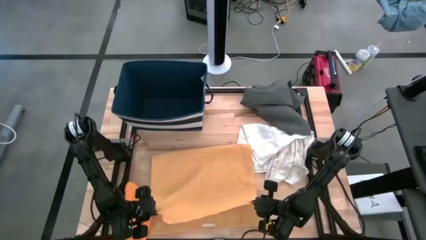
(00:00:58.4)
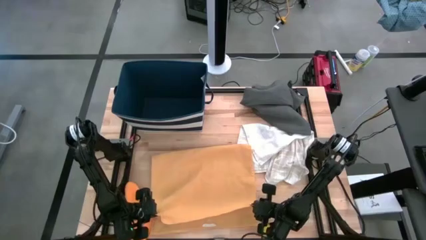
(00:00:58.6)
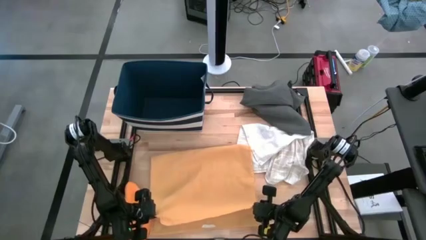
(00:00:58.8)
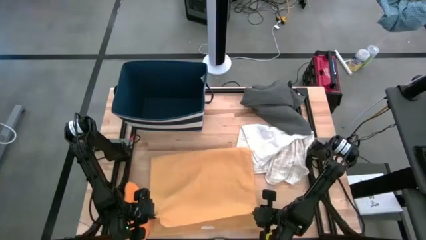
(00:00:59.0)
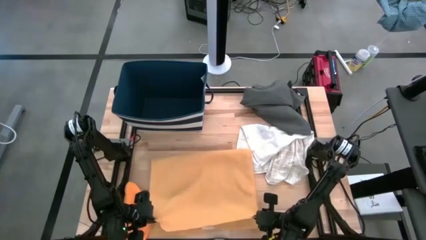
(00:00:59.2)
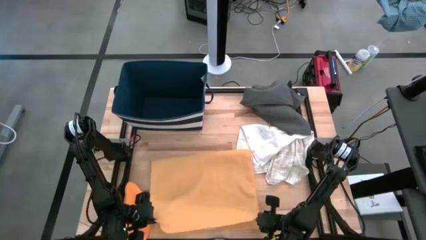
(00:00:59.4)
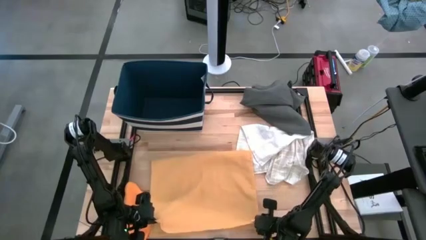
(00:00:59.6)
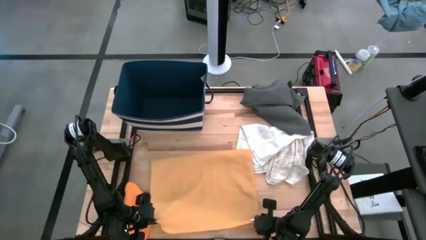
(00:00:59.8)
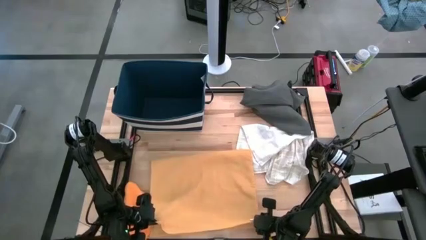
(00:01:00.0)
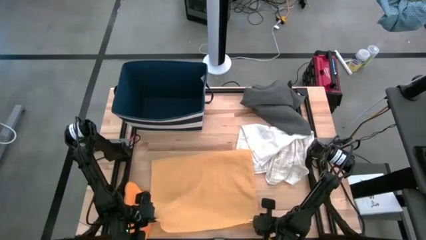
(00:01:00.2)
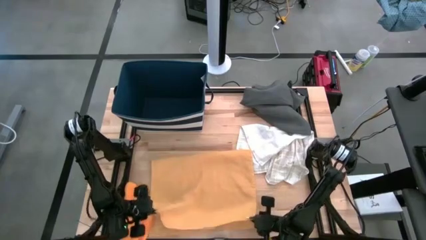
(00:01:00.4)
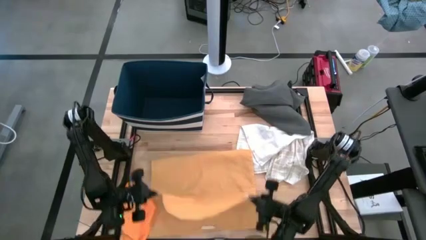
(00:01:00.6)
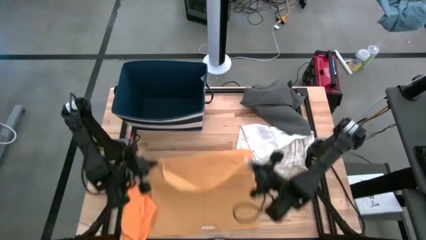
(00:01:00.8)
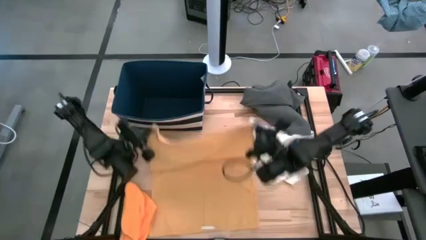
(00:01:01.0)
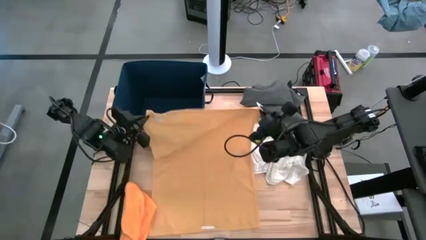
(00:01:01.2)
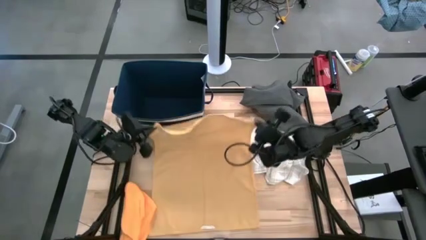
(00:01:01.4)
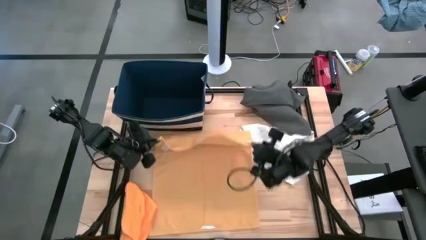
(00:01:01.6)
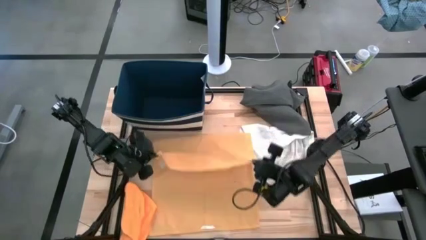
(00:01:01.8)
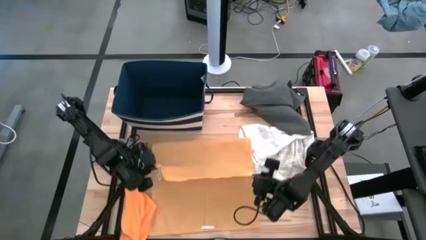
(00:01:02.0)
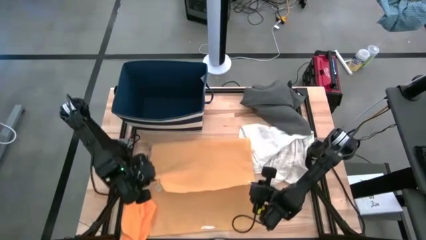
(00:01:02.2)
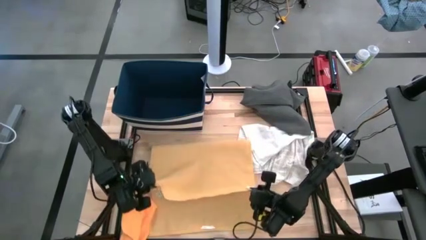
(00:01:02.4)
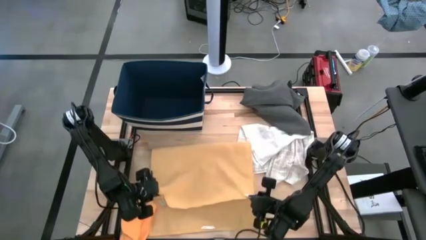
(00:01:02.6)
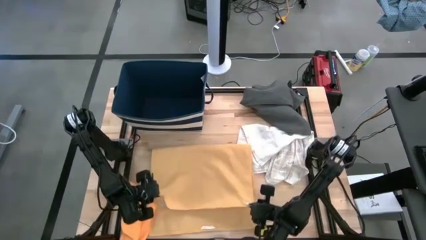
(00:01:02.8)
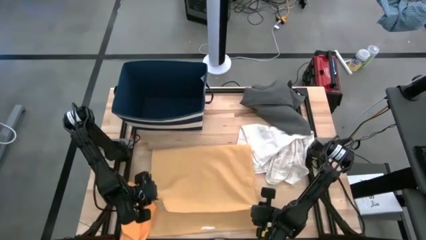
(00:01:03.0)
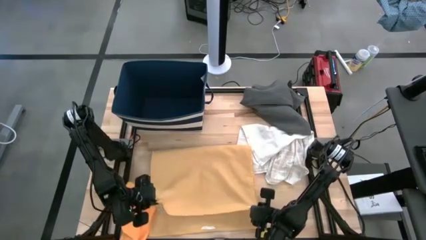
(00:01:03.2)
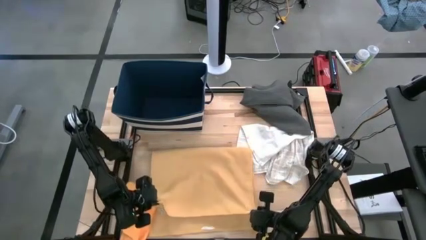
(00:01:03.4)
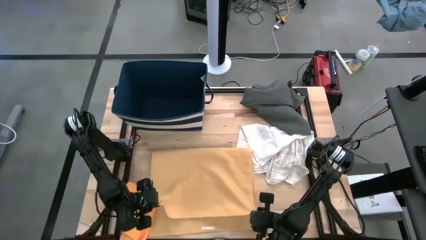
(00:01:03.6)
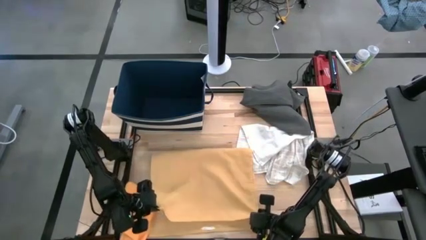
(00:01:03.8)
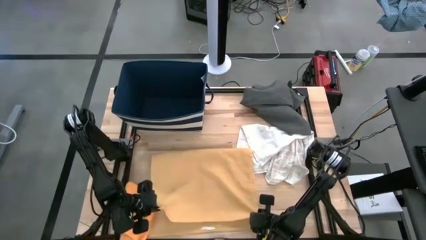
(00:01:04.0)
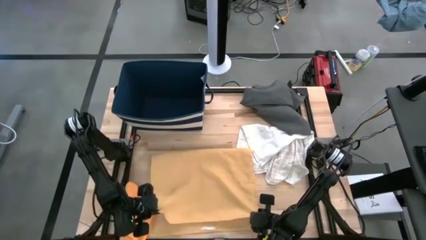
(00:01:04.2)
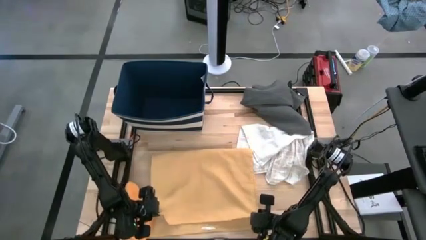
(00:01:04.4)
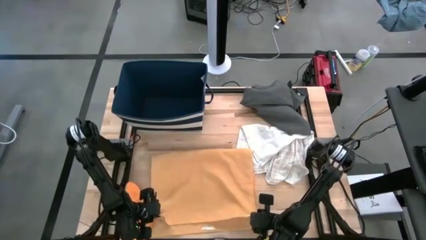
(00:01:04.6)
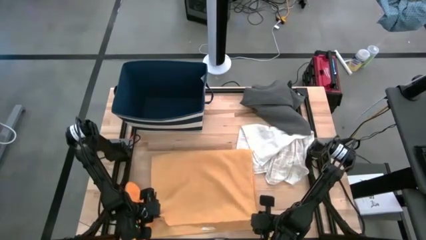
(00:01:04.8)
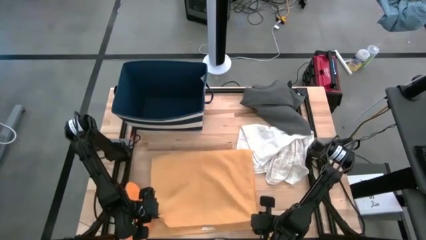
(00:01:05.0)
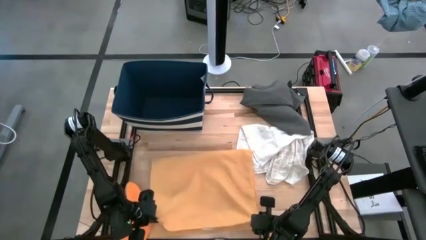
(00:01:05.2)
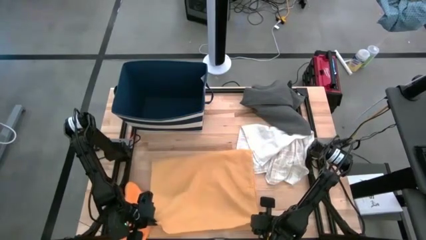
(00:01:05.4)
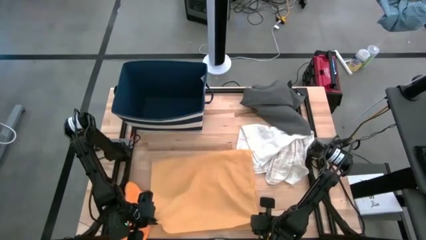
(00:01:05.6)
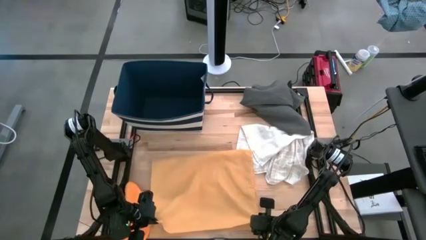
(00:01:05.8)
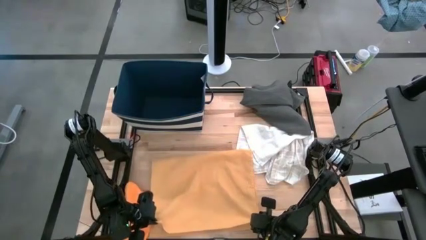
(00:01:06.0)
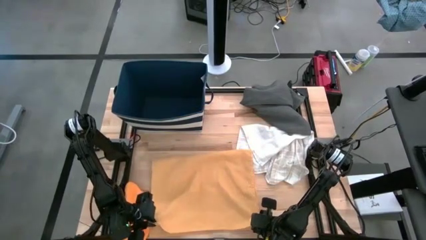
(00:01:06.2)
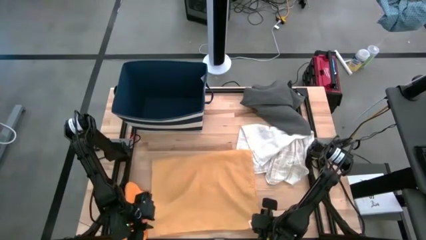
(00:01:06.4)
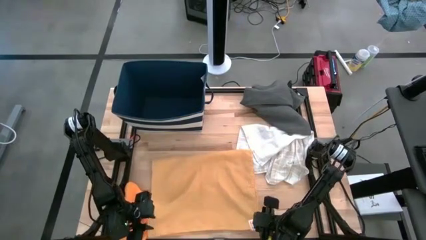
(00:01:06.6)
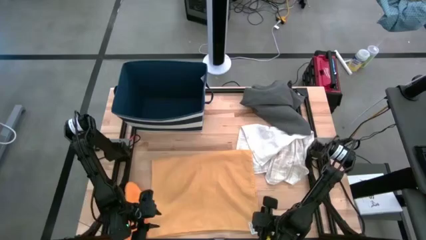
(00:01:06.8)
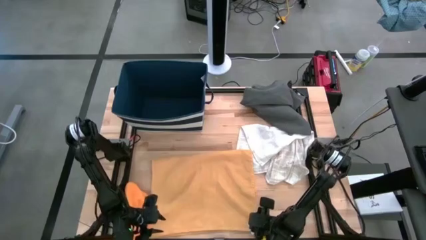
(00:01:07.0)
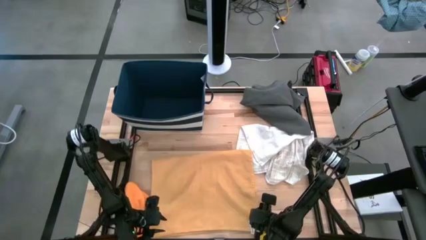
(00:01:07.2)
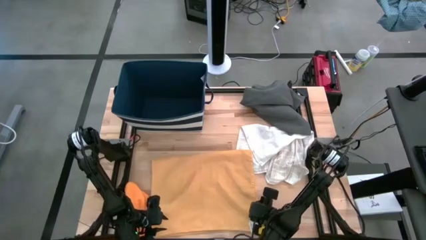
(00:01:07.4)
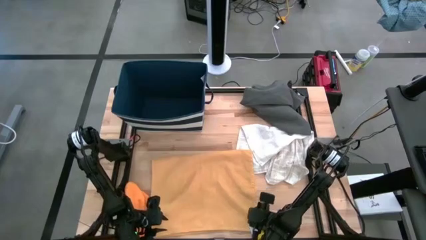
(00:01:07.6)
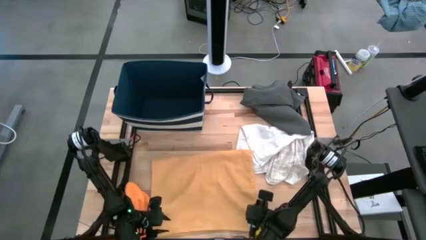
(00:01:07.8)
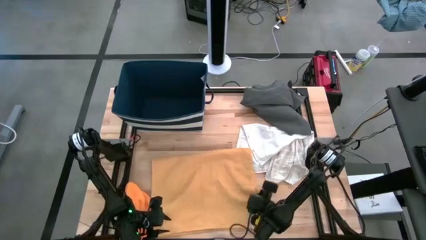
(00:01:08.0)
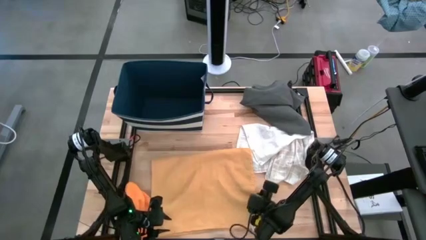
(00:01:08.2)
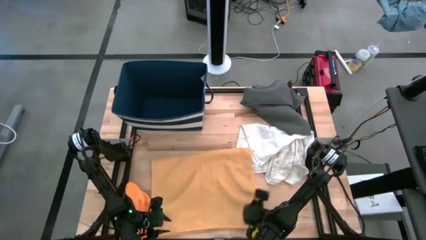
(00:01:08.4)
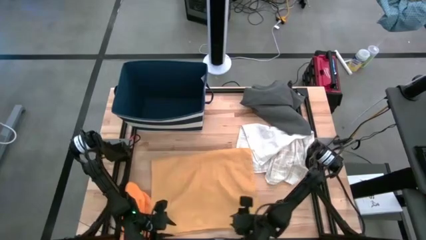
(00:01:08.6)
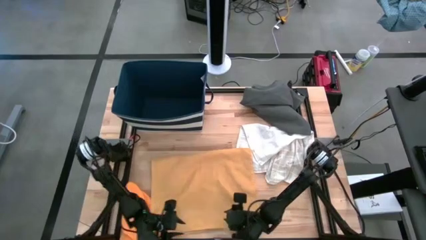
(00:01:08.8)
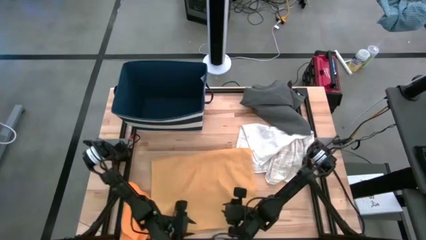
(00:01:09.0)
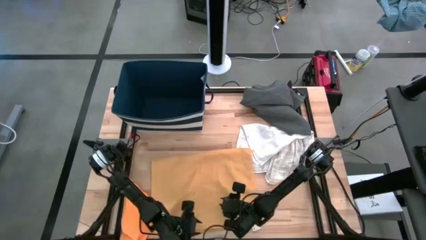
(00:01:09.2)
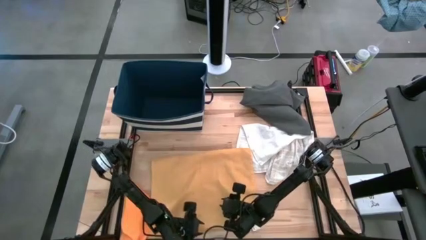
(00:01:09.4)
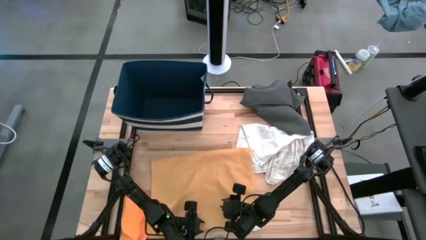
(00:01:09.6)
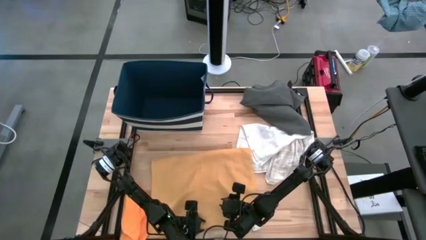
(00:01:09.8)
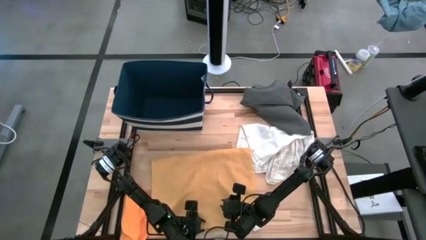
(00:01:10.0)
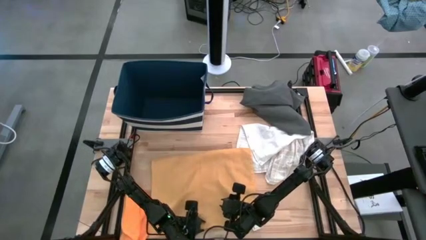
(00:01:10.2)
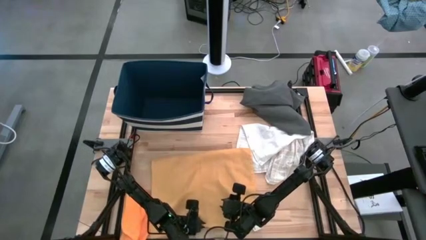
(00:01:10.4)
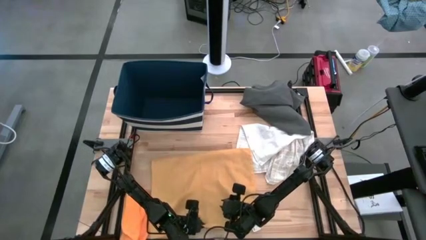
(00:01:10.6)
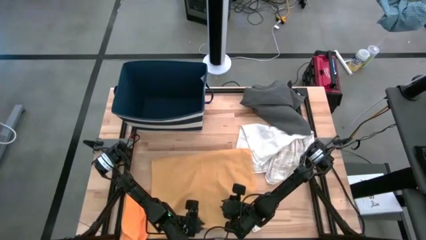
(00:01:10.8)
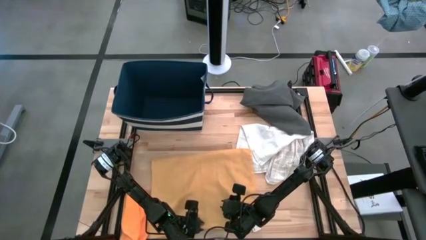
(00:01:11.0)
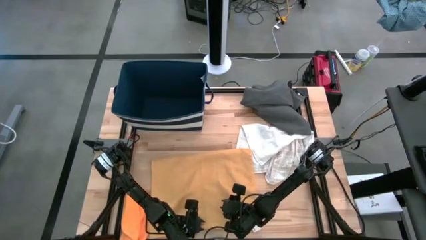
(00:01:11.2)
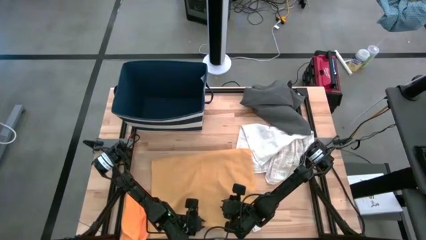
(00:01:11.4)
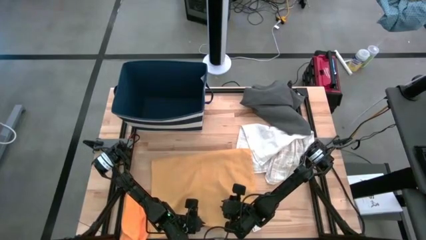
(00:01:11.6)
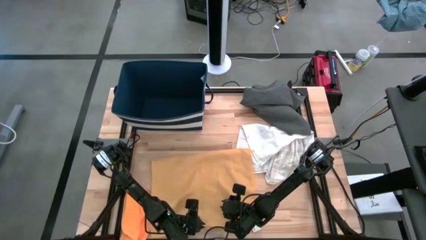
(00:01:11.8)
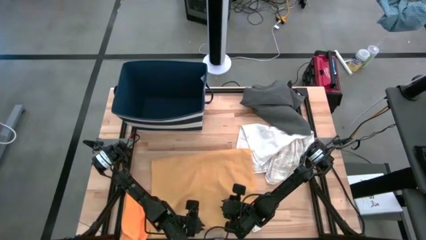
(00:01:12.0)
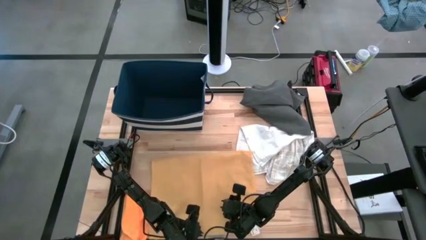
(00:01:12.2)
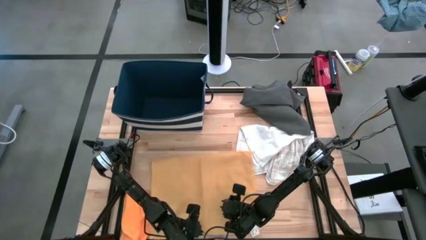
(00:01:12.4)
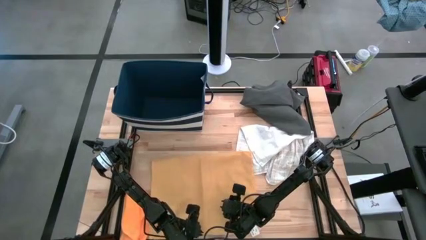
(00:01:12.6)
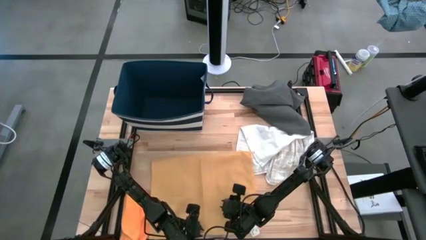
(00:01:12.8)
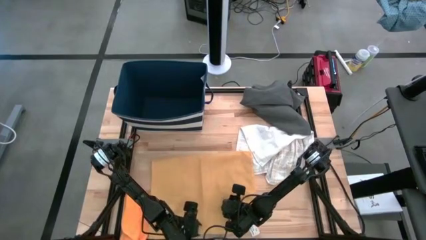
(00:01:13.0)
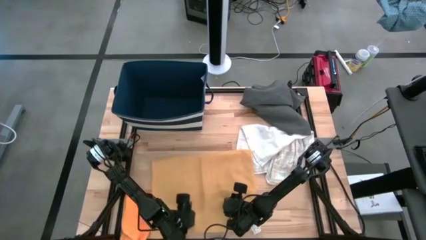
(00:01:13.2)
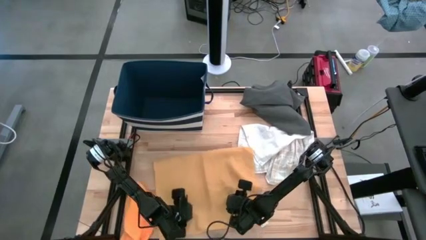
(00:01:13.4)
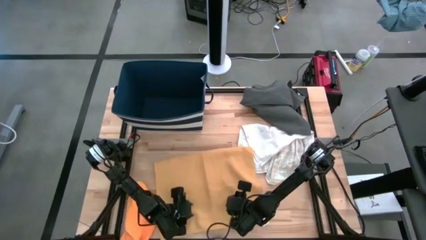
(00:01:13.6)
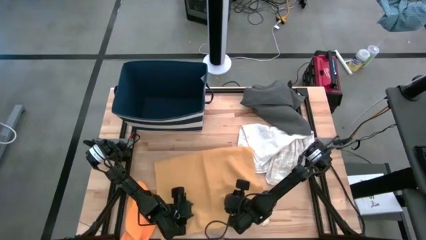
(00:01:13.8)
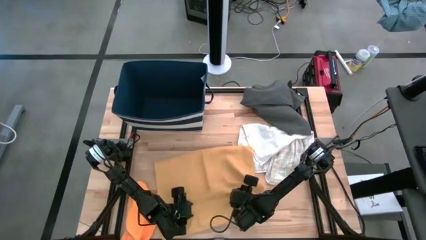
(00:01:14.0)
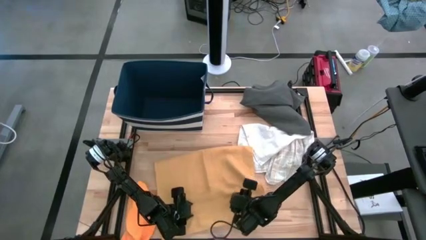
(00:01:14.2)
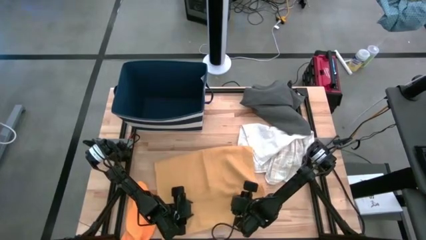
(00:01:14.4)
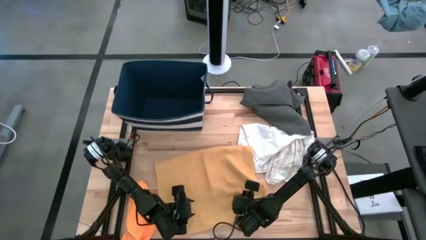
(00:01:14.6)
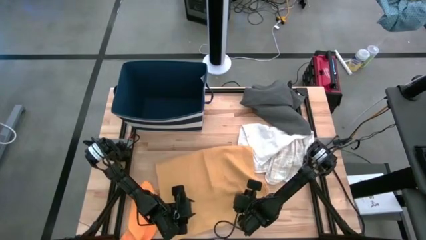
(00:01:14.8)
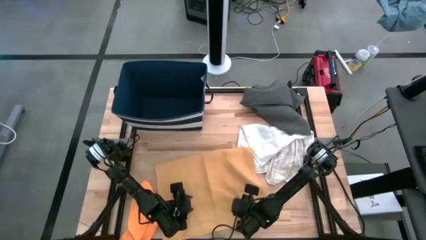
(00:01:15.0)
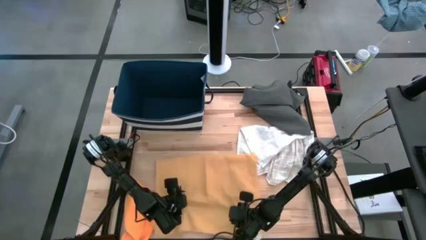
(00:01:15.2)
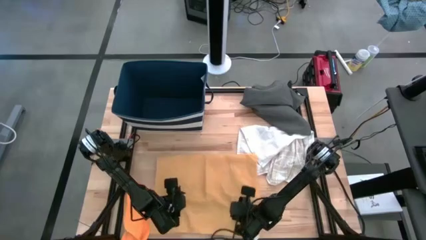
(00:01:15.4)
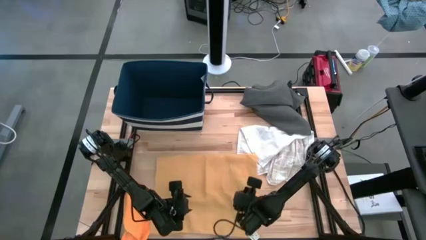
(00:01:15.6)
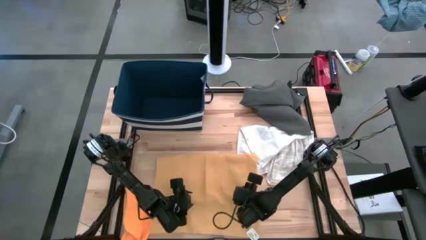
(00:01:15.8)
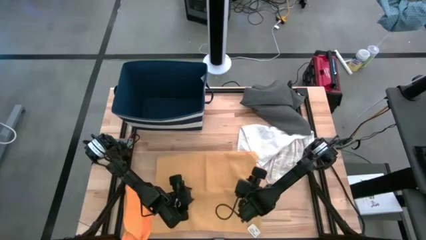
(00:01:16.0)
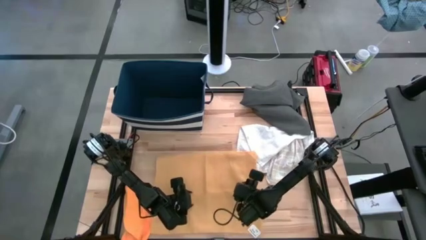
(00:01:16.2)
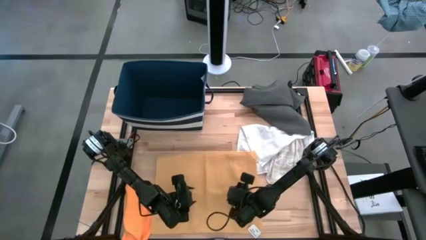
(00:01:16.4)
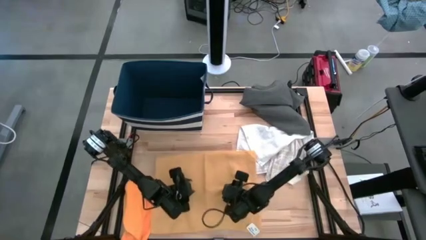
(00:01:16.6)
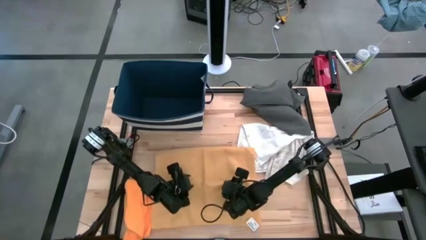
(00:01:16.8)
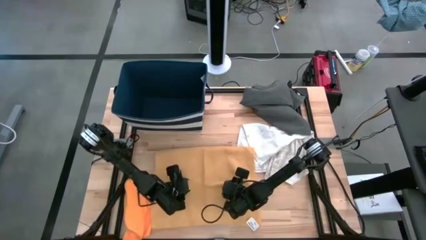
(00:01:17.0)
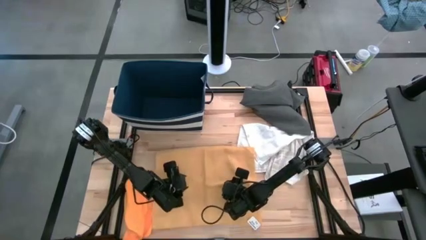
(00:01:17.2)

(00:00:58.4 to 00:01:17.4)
Task: Fold towel
Fold the yellow kitchen towel
